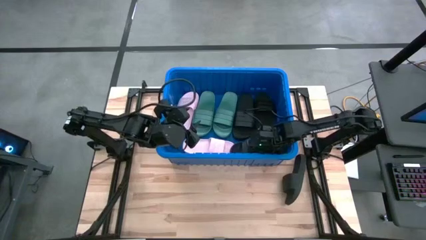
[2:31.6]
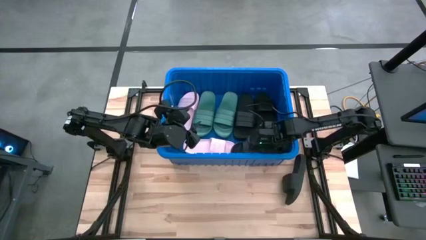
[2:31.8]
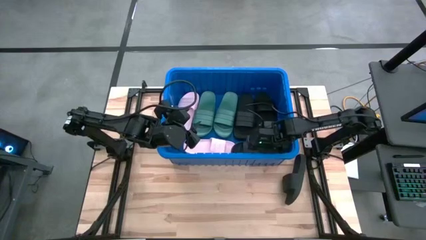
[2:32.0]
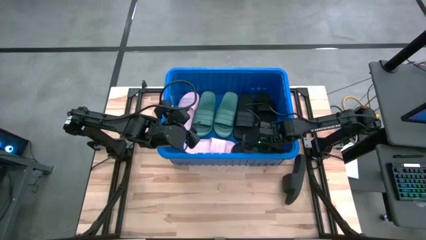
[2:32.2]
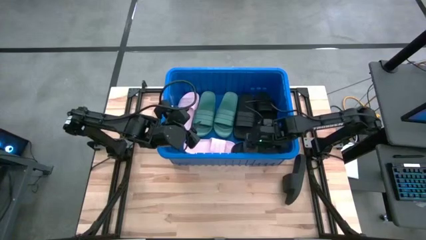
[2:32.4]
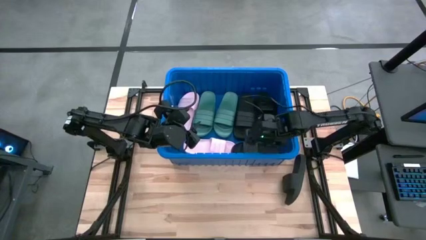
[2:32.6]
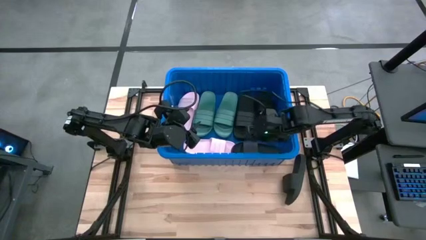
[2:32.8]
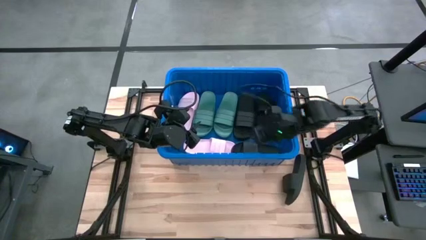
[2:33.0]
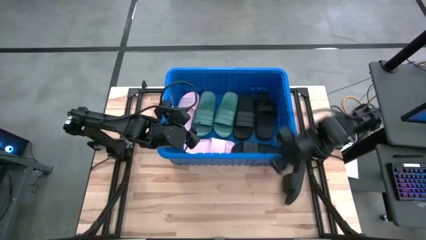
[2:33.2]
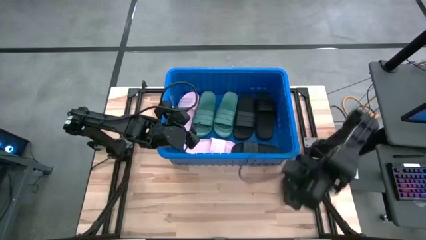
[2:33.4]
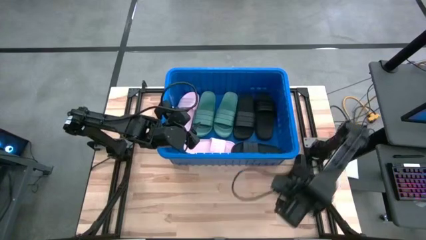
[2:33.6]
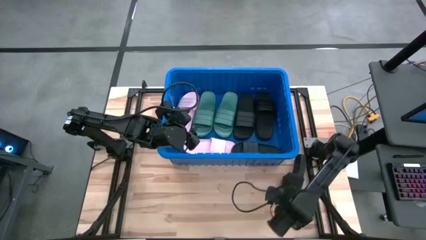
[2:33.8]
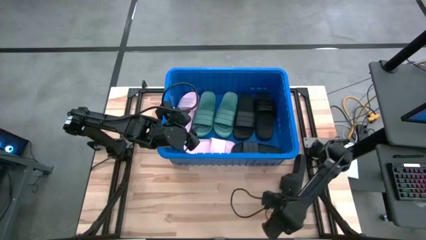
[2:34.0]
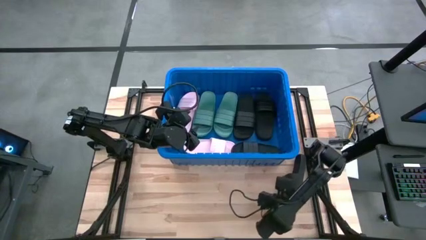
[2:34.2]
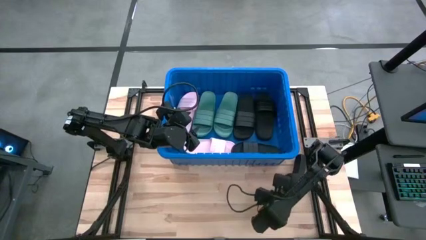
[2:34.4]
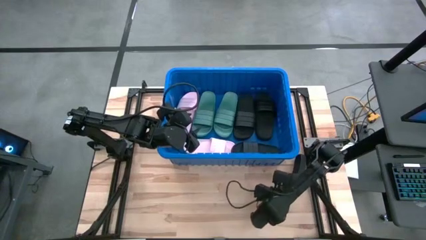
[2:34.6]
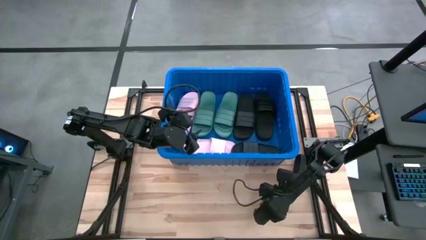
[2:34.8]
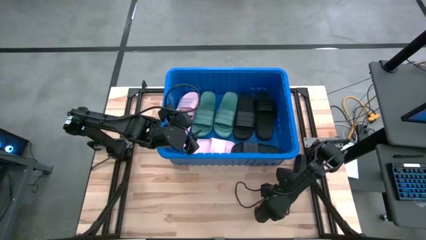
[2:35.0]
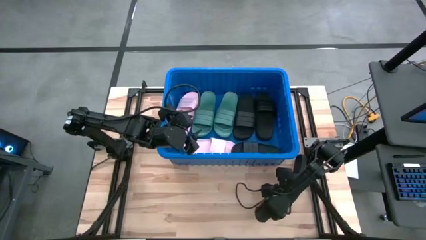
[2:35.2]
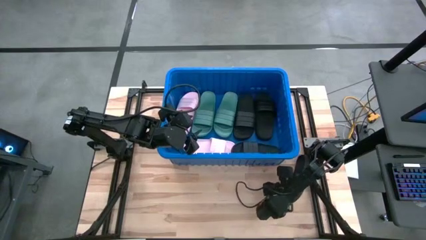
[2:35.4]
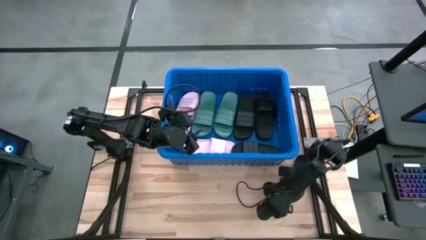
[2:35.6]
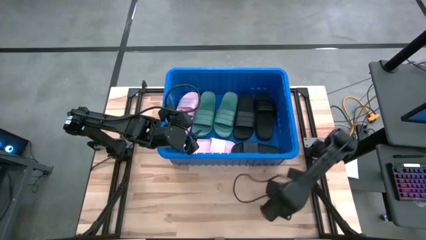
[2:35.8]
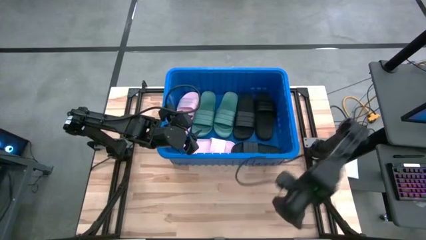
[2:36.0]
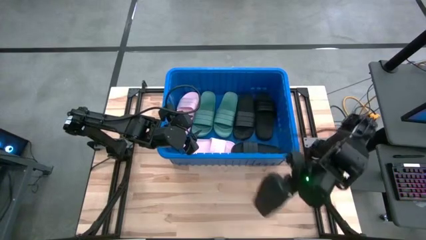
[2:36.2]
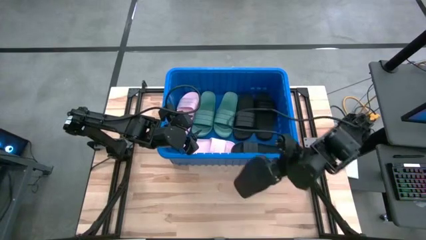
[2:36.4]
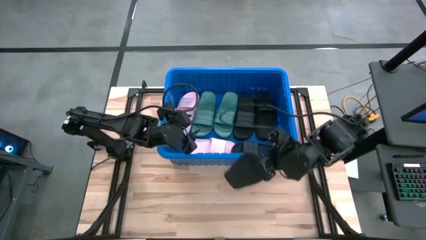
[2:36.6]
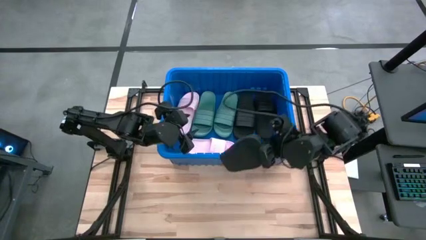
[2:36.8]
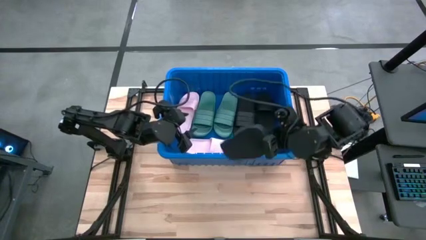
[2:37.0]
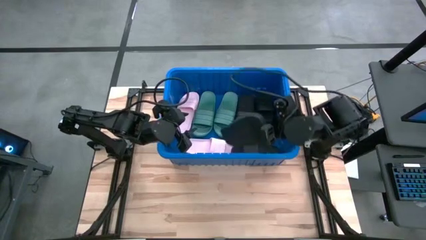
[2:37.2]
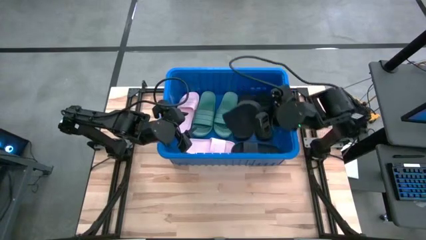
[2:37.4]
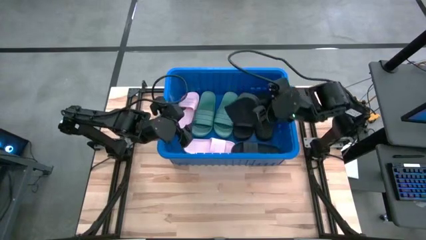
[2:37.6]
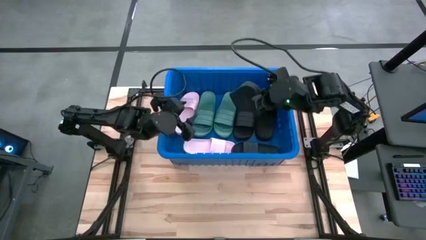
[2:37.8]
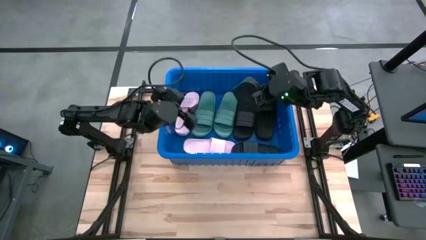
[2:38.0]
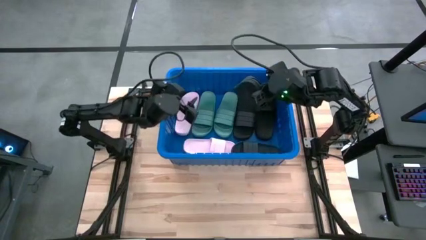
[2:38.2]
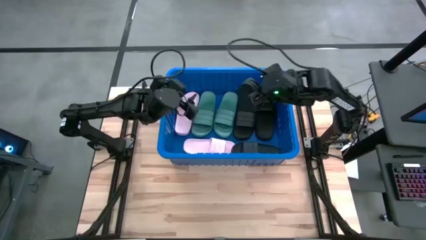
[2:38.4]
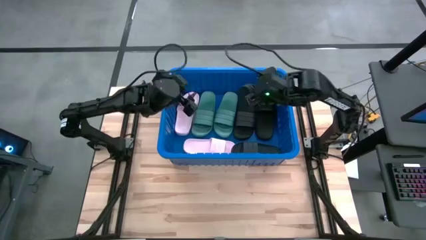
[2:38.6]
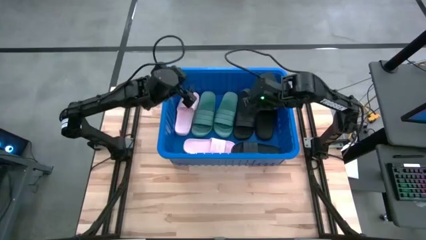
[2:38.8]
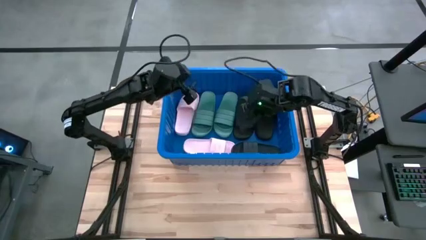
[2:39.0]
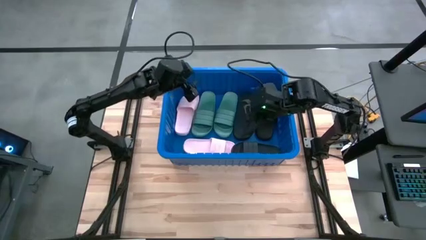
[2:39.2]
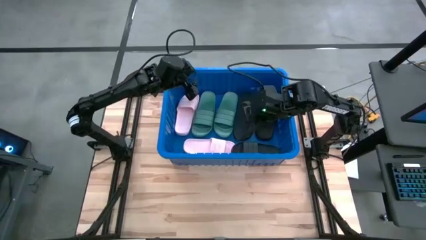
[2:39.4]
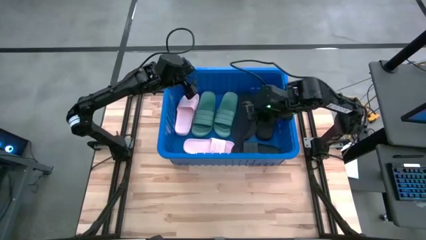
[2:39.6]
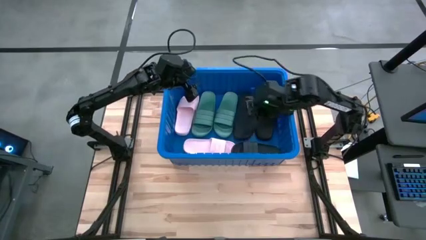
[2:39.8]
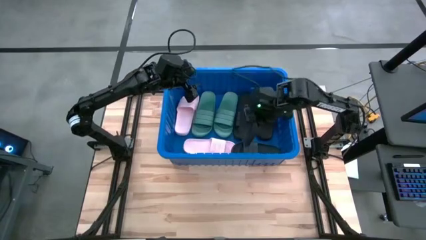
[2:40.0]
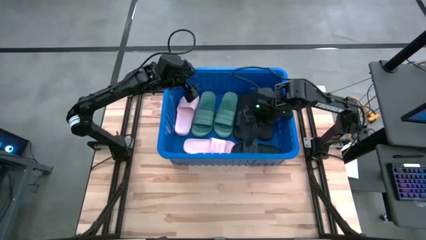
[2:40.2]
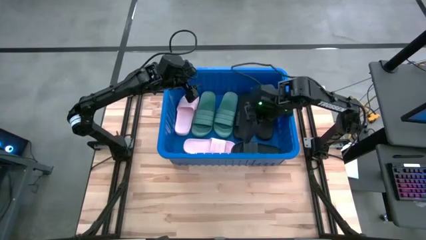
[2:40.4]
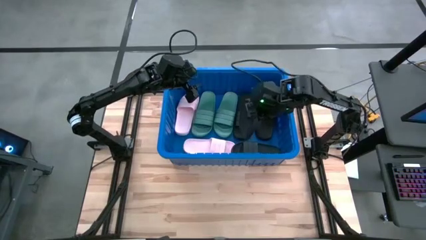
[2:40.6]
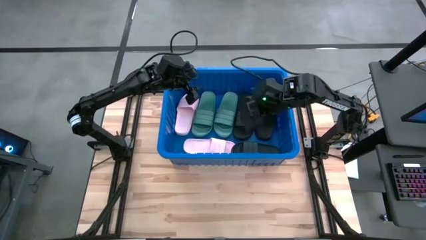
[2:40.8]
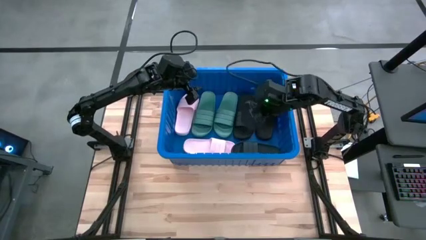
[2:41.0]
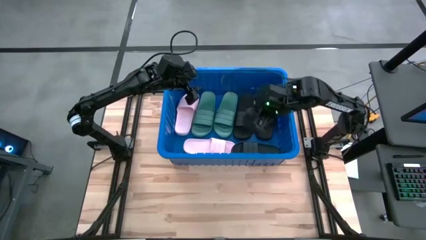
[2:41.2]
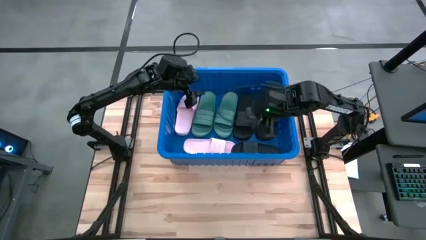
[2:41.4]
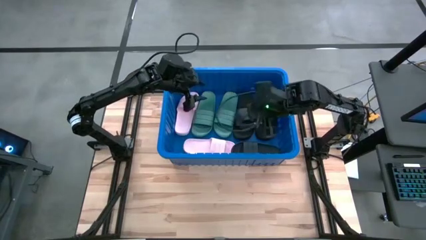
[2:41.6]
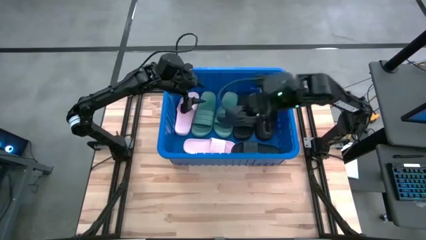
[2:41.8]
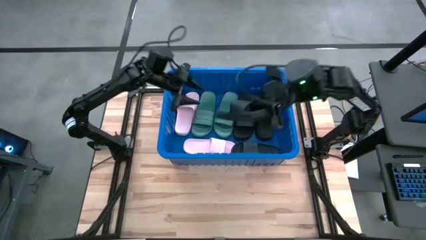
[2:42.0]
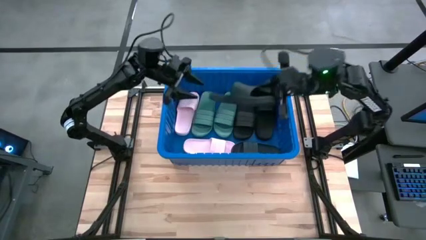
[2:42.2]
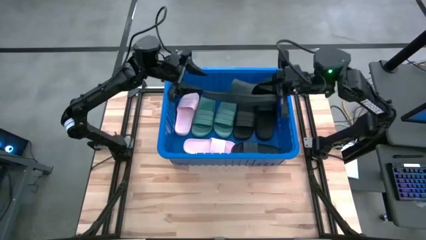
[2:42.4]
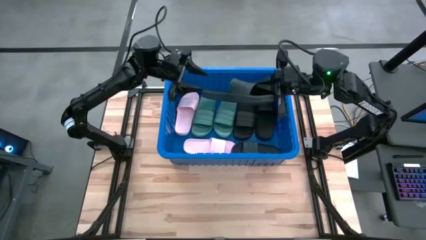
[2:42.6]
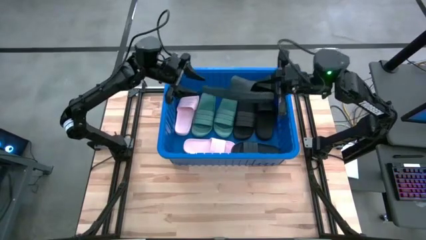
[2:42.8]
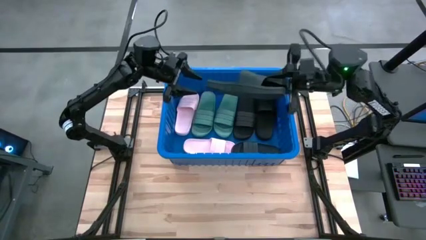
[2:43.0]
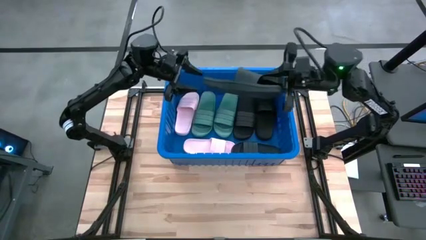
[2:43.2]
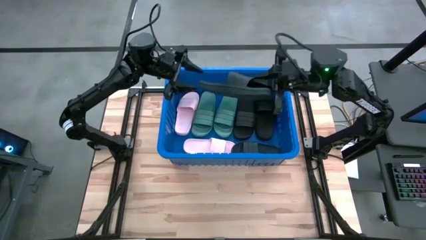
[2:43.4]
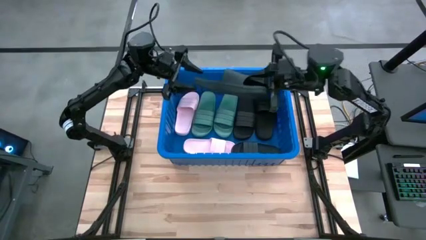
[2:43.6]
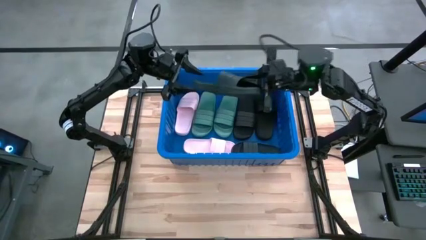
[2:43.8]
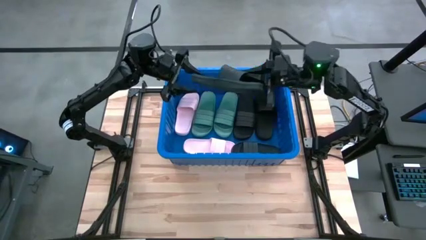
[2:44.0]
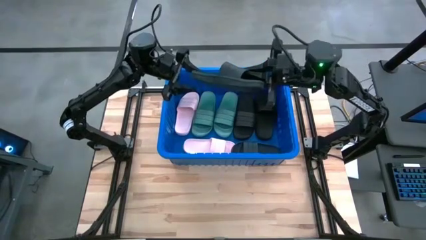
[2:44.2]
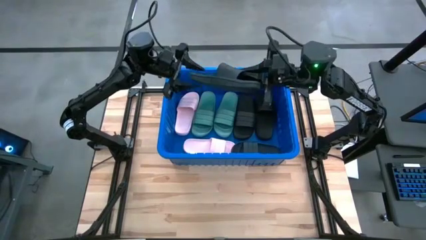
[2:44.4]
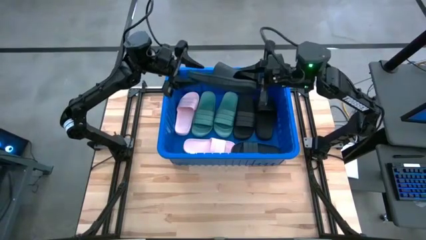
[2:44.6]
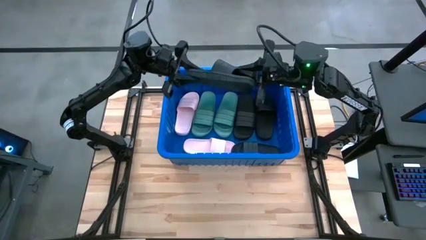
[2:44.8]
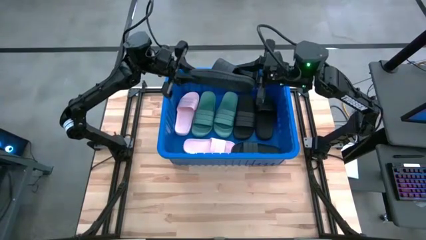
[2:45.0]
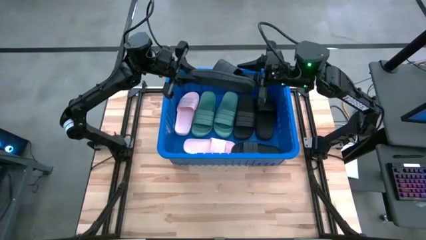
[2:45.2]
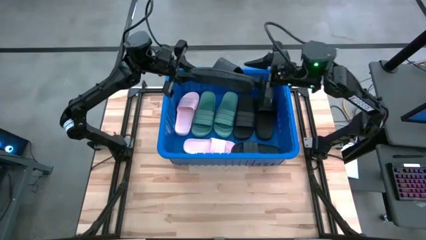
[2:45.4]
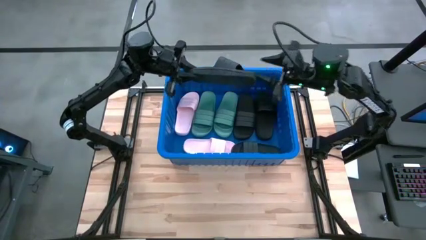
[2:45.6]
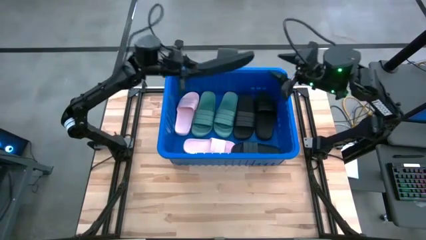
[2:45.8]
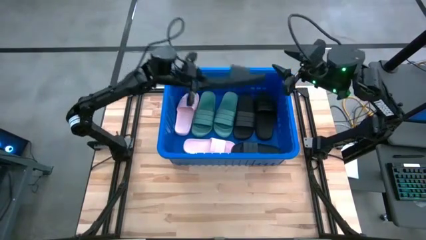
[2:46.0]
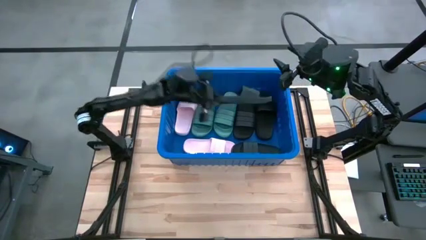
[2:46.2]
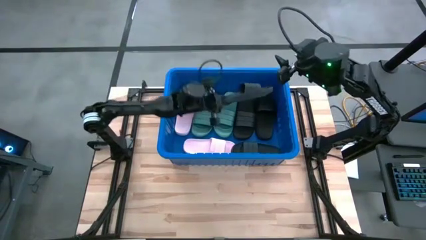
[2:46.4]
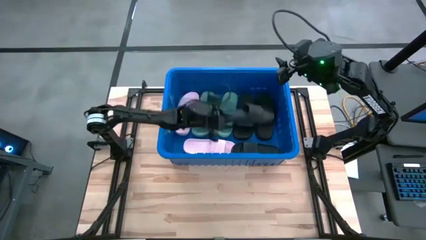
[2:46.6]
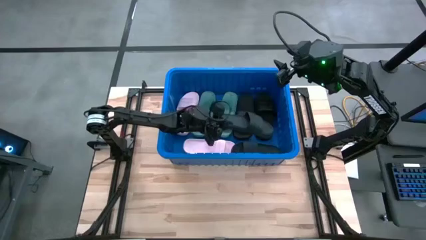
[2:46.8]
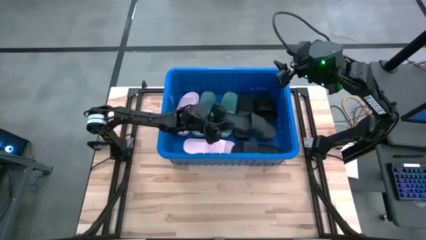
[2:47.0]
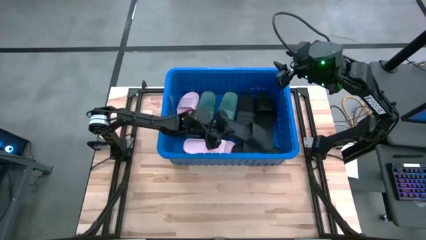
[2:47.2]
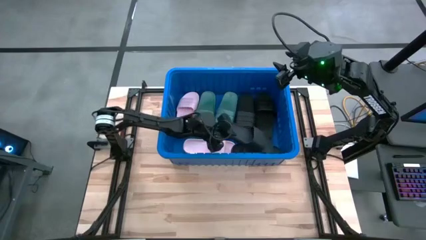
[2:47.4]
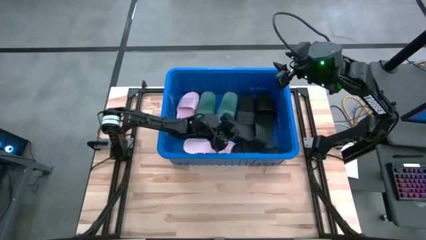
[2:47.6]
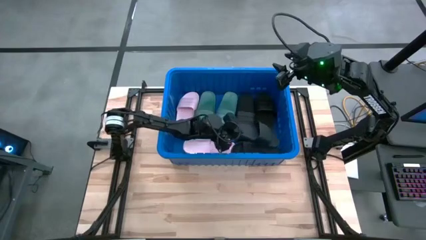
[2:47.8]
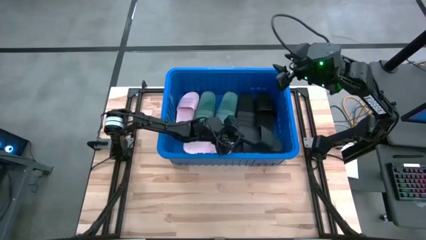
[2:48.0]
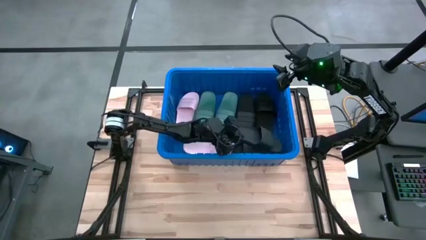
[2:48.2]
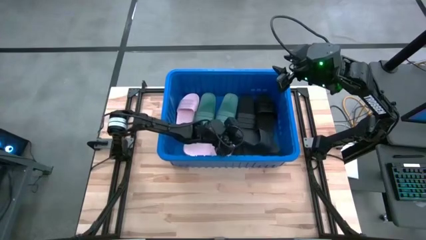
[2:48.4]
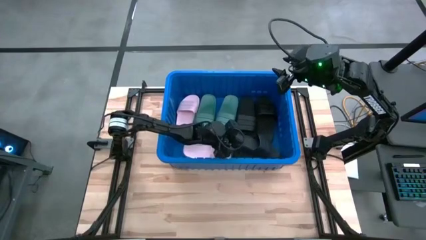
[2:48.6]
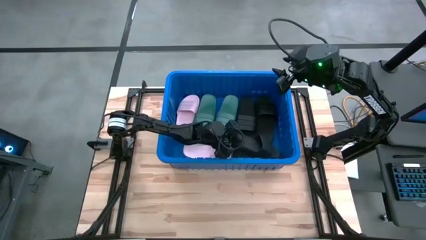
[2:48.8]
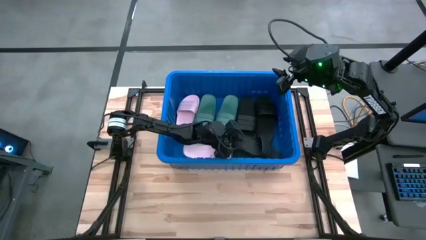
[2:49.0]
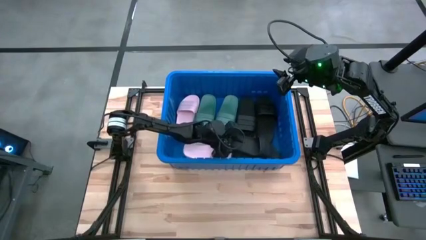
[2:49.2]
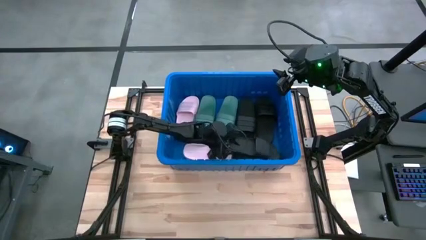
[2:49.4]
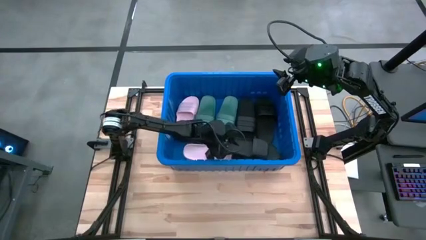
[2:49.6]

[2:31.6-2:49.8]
Task: Pick and place slides into bin
Put the black slipper into the blue bin
